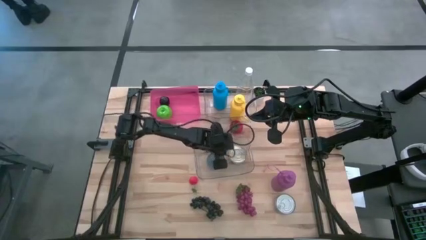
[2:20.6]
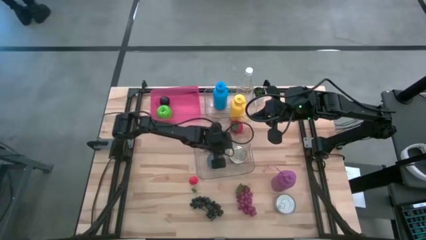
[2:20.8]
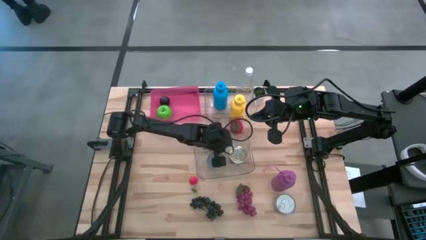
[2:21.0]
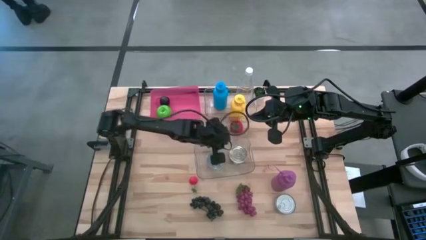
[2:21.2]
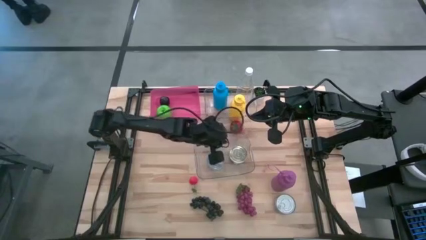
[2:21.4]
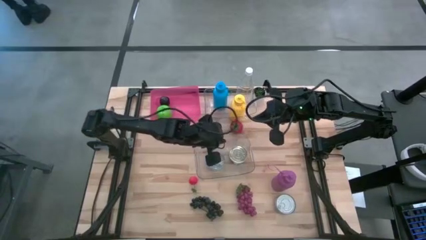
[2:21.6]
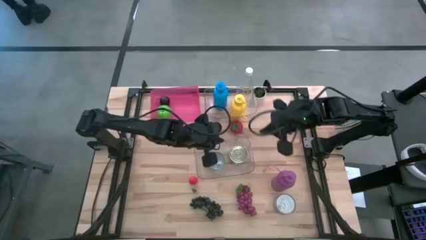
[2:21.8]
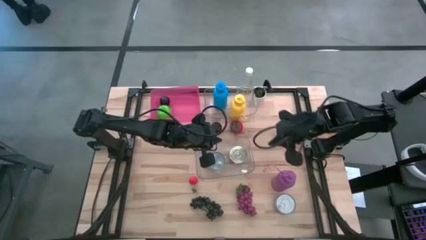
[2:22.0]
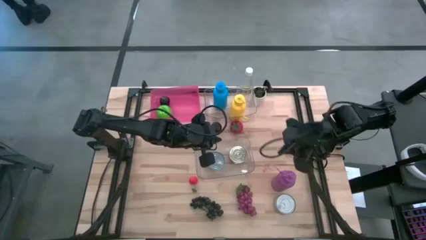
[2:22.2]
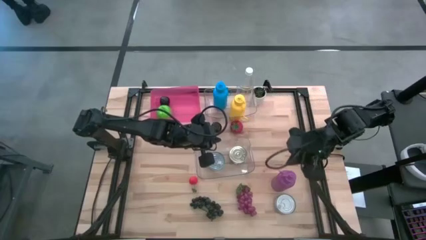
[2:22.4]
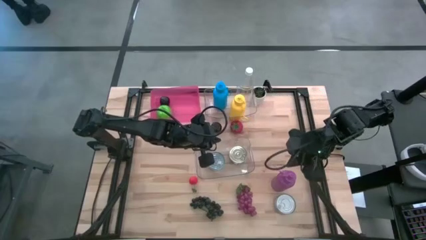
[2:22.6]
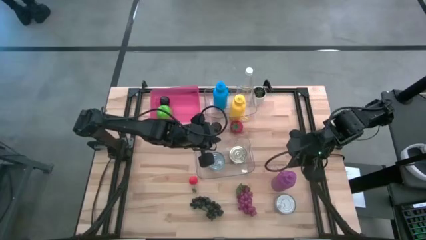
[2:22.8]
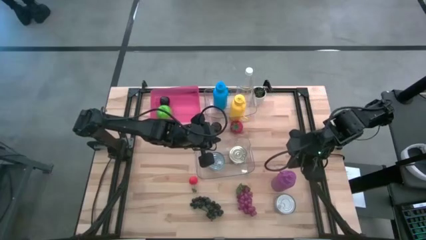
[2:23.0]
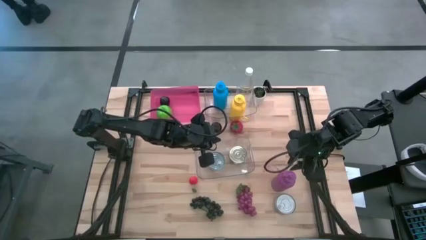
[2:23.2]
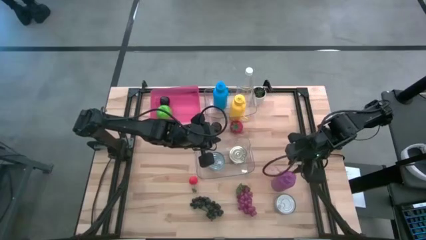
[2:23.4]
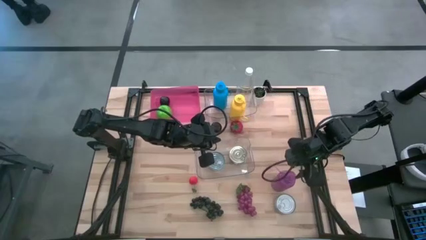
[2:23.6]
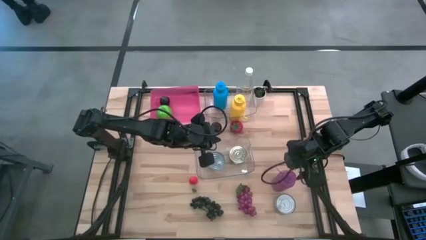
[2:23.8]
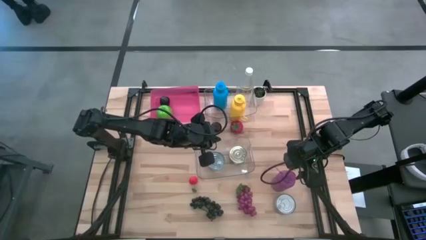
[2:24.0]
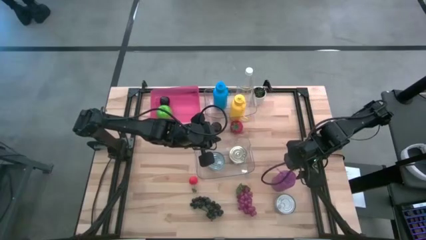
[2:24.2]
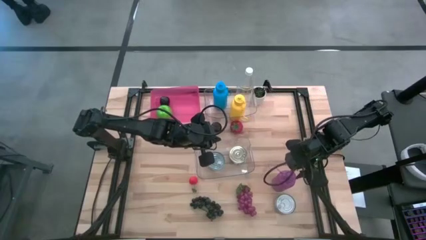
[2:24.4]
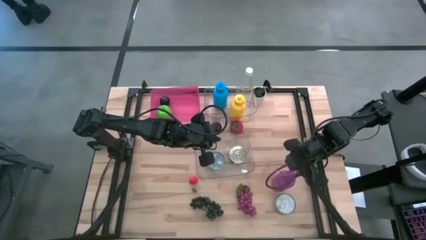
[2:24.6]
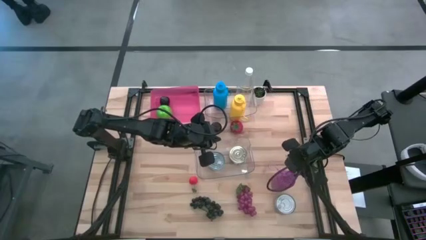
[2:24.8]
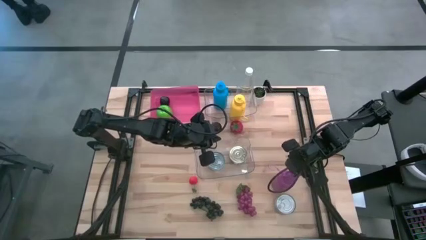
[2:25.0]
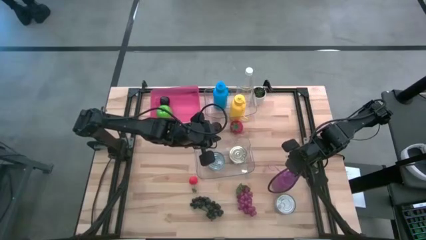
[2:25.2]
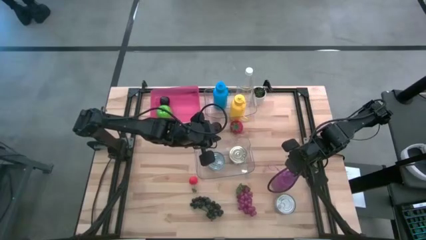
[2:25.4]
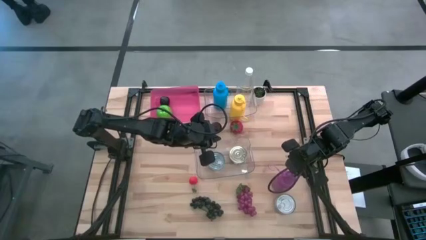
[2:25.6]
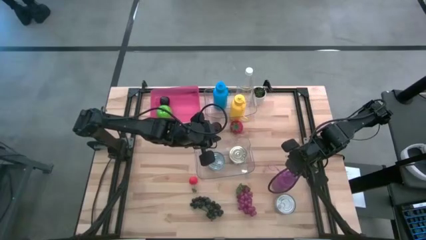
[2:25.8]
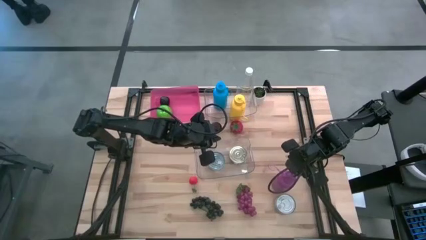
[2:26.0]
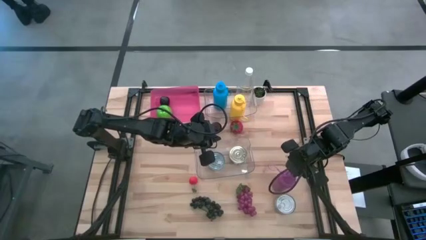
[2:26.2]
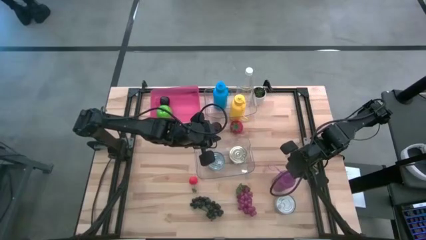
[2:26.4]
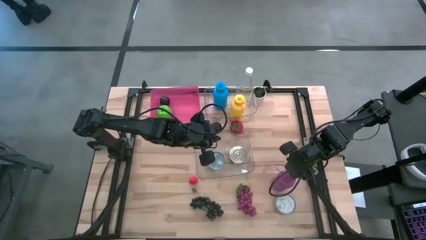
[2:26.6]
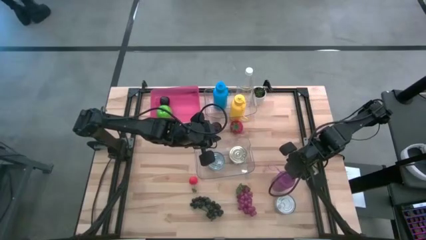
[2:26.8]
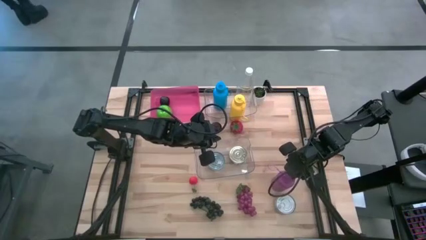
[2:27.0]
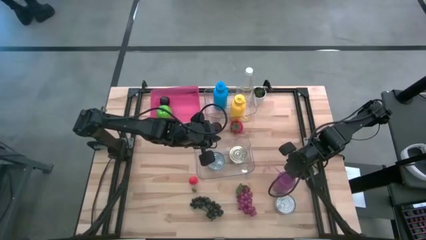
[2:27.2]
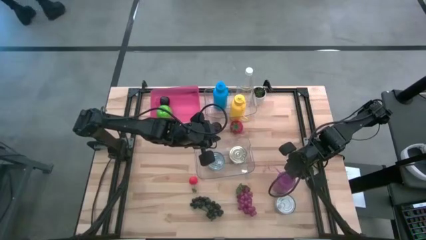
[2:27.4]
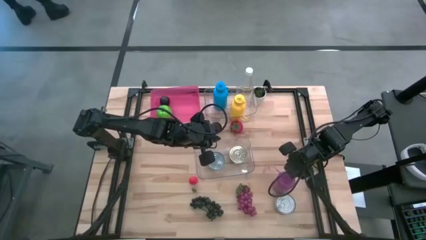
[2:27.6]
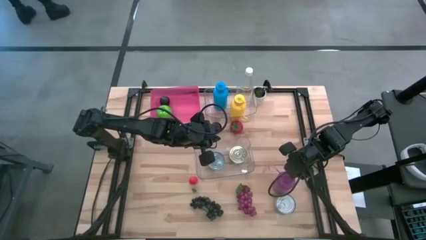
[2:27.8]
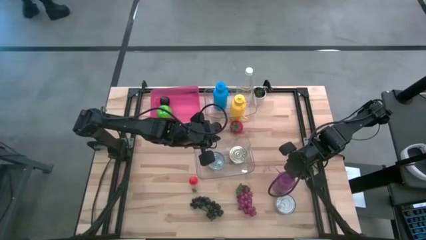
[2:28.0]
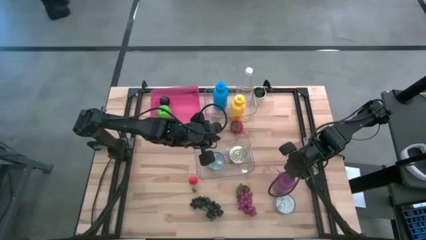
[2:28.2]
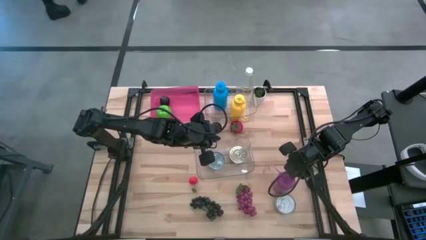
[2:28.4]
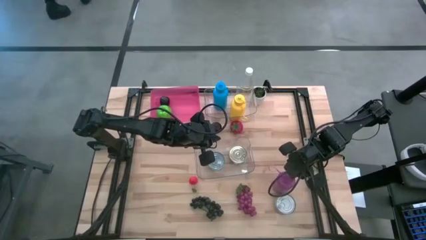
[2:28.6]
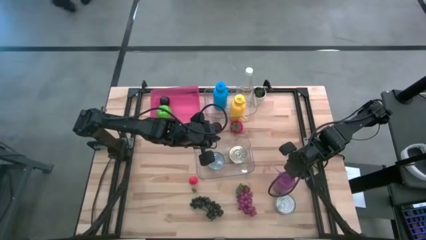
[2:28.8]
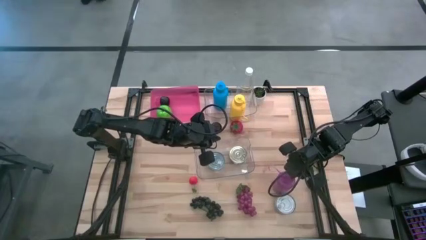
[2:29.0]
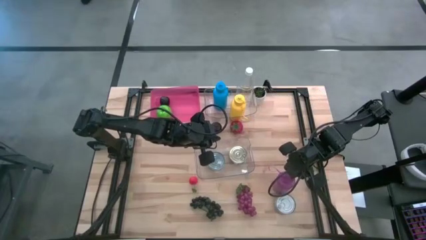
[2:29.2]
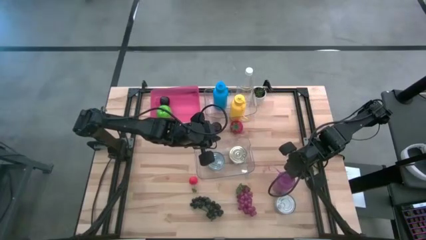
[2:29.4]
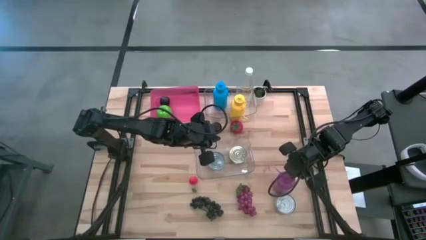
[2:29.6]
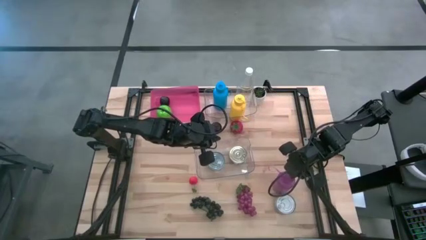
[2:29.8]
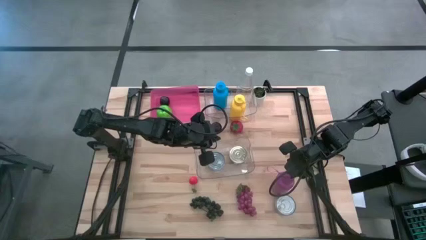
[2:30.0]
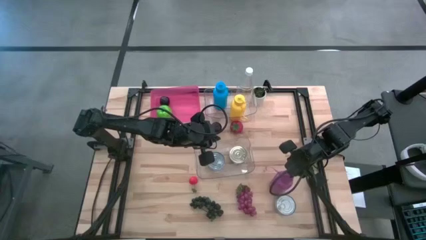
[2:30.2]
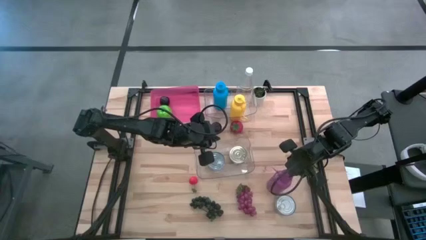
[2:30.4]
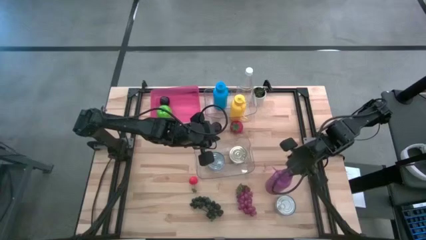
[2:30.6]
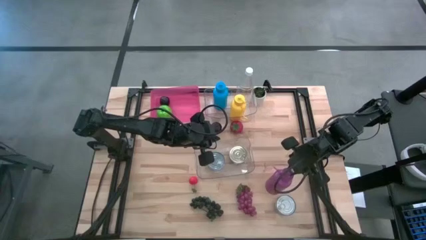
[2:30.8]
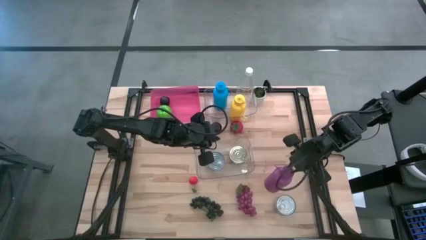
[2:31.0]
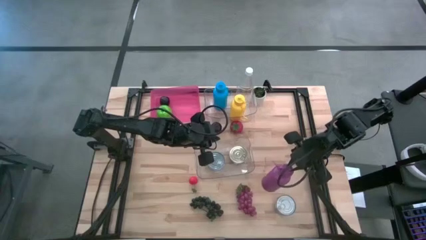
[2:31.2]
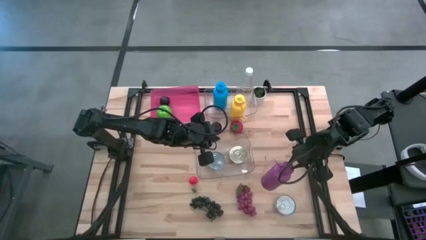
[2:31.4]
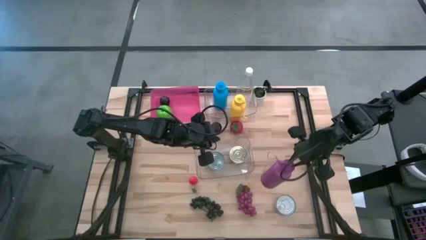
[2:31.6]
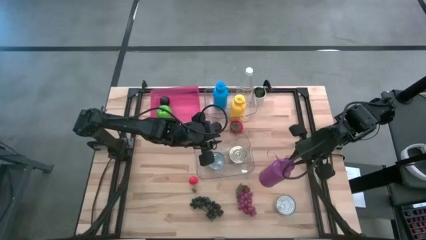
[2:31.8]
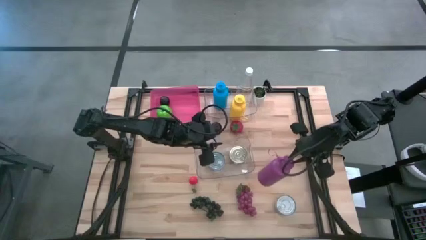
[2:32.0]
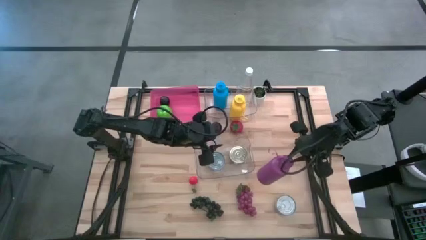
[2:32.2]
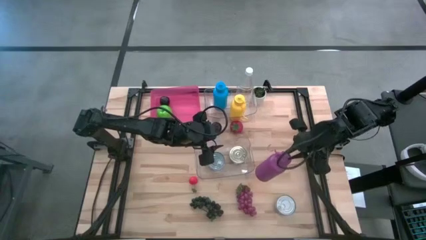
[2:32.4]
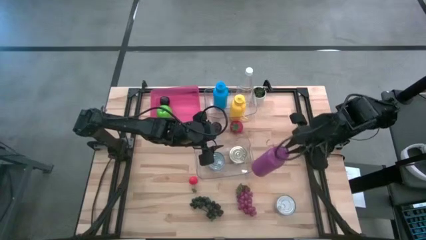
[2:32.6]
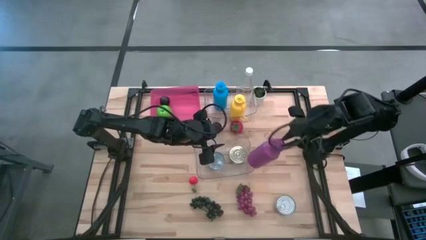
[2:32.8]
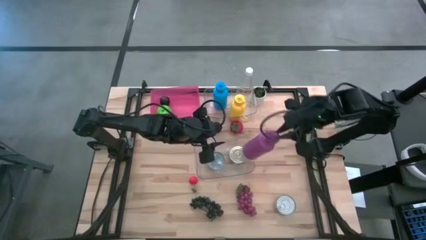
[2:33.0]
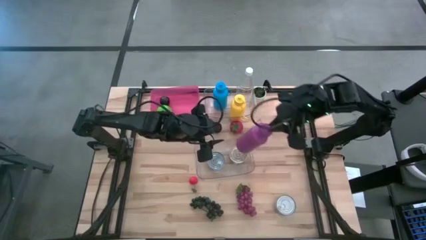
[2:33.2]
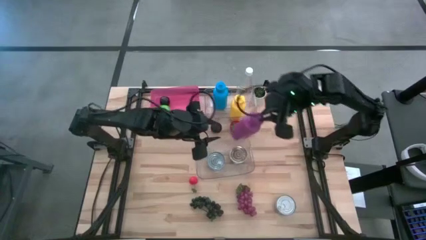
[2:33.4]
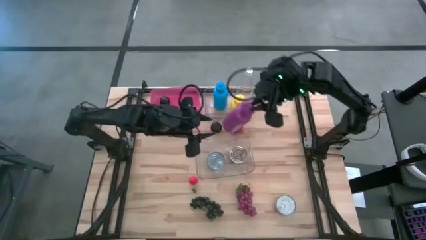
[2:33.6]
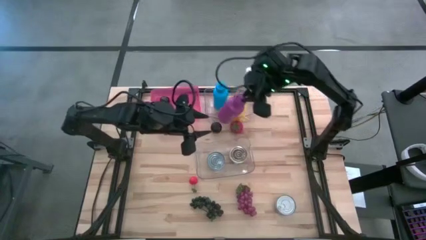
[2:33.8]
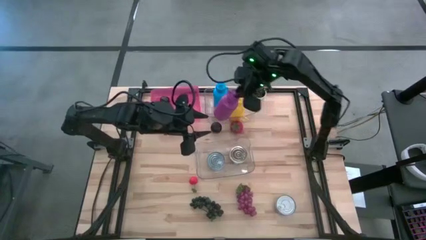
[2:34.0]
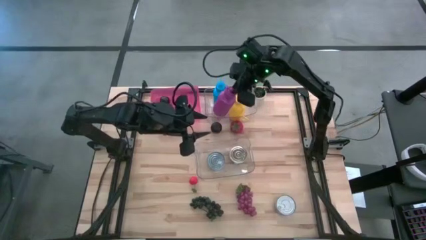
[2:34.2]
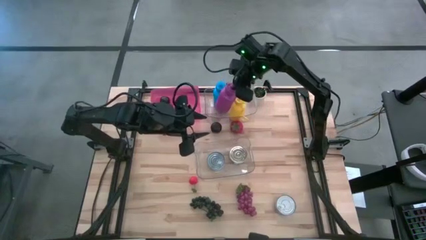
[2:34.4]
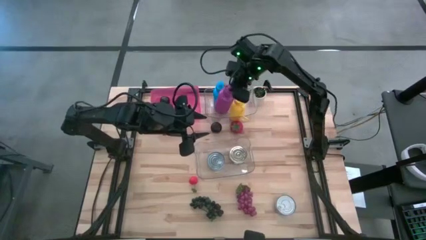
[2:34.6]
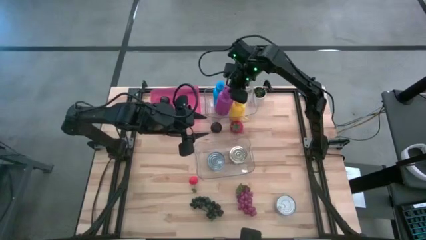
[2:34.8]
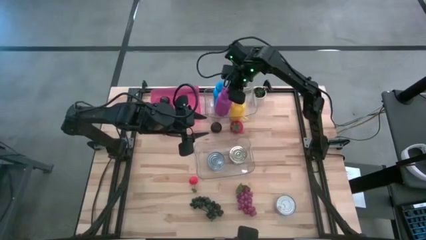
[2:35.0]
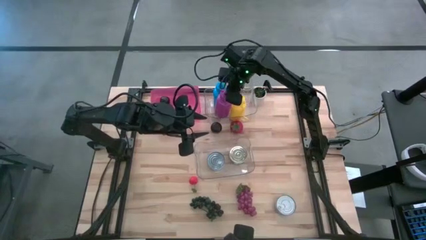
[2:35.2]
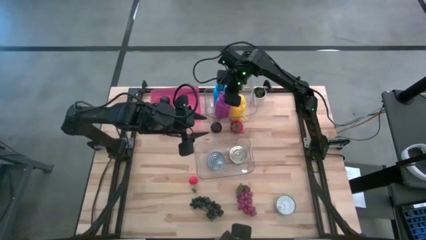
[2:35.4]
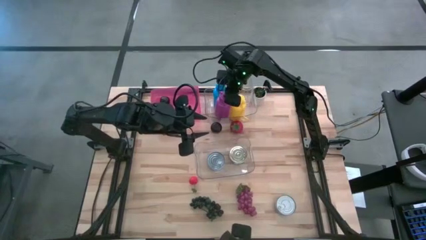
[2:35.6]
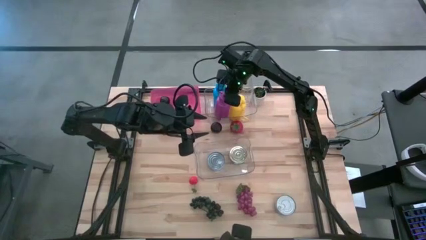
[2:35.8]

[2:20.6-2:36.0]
Task: Pick & Place Food Item
Put the purple bottle into the top transparent bin
